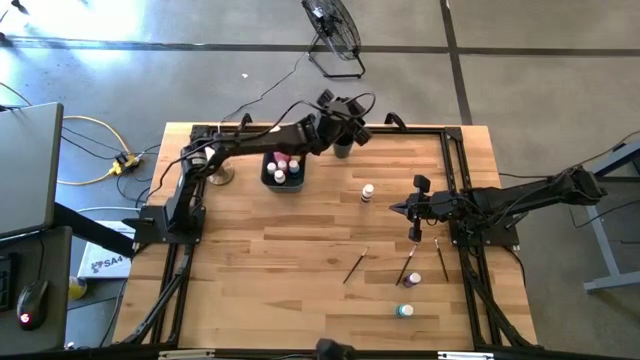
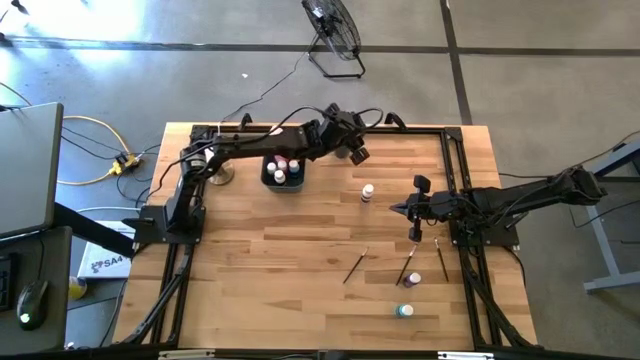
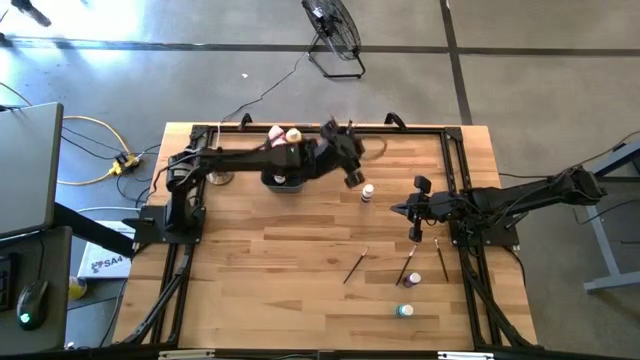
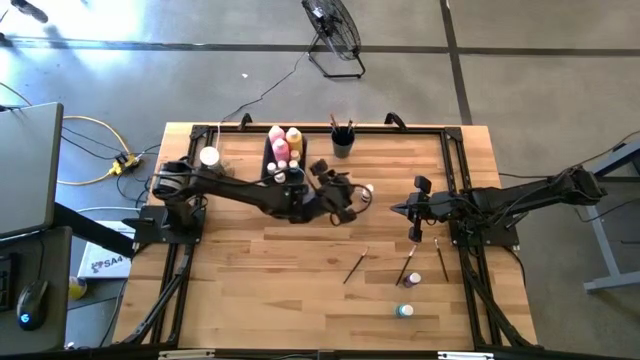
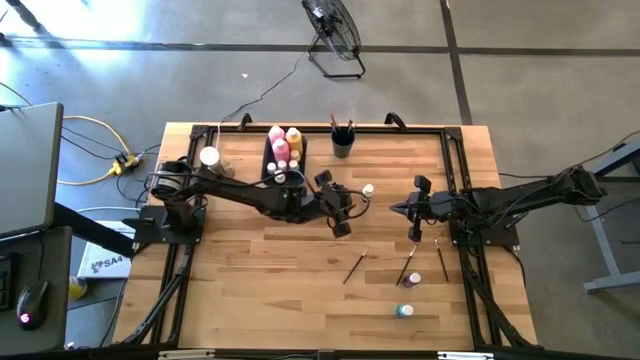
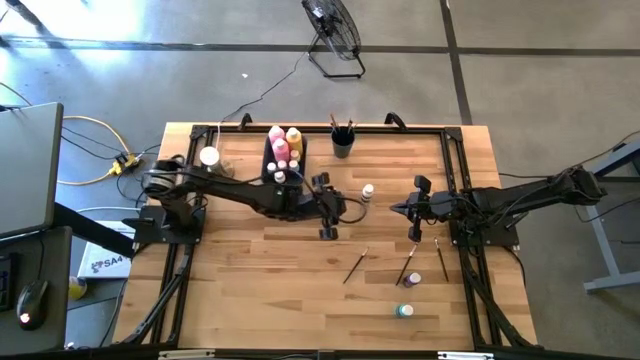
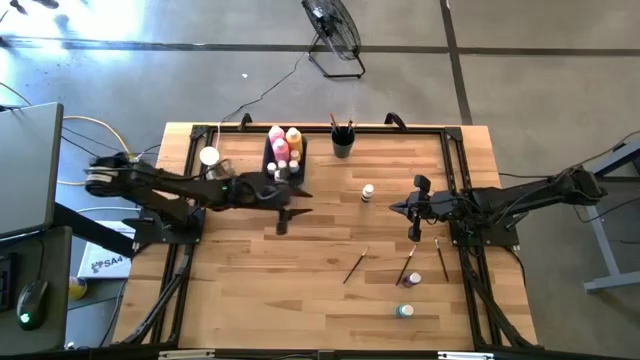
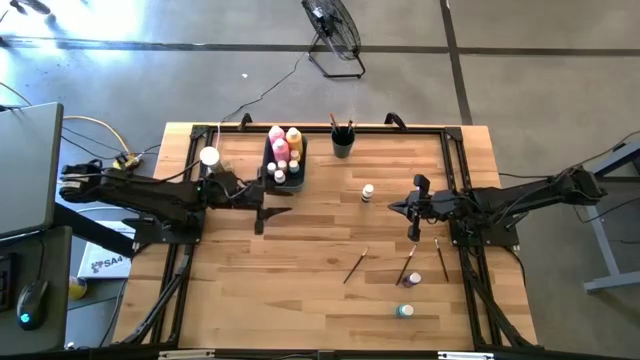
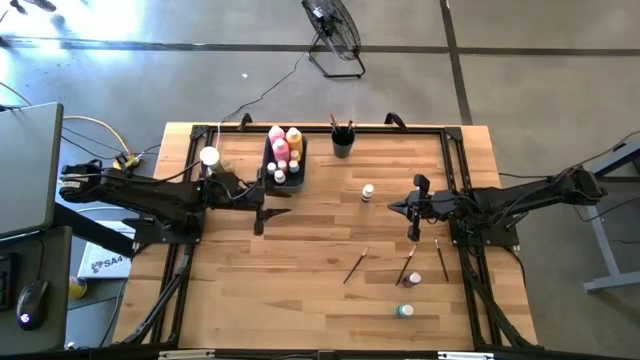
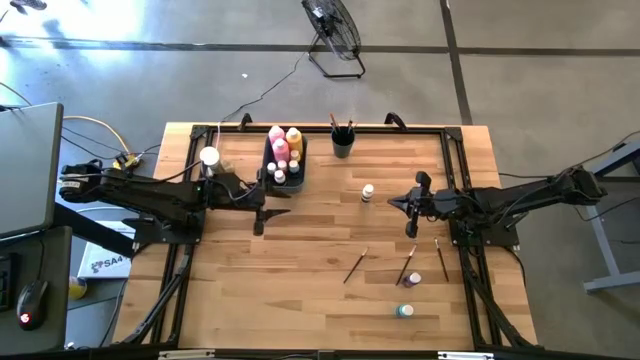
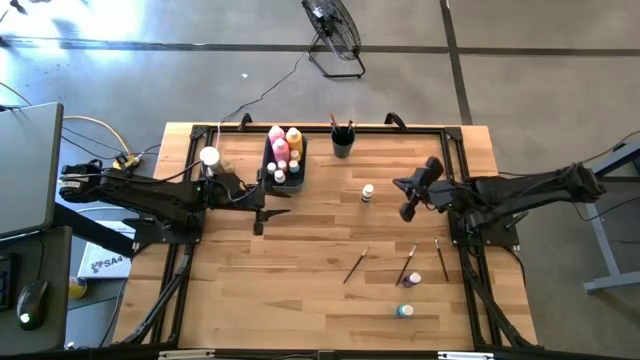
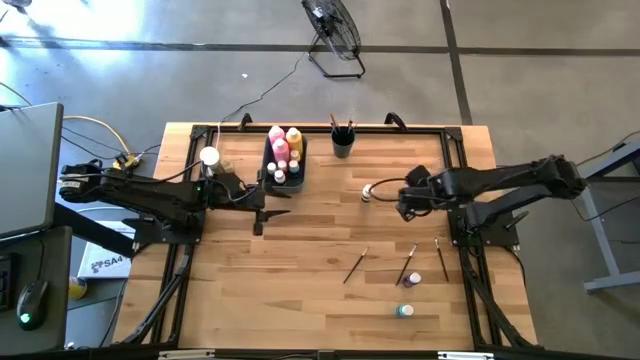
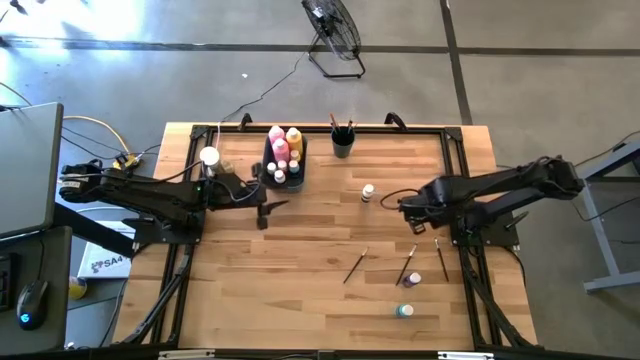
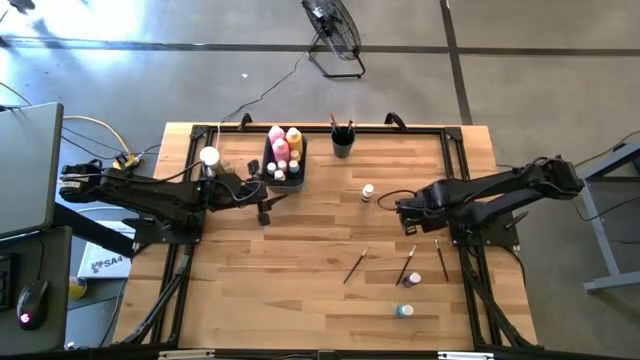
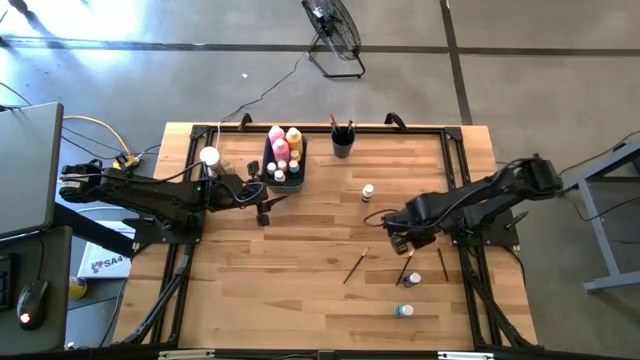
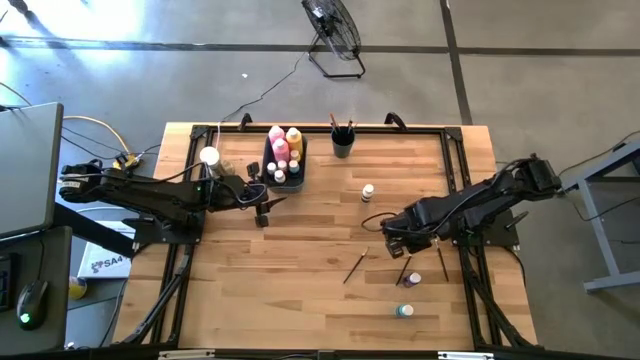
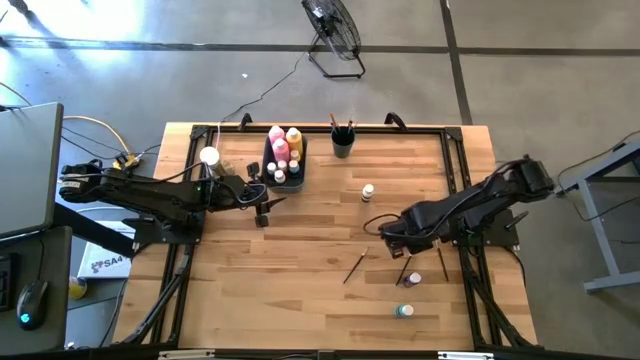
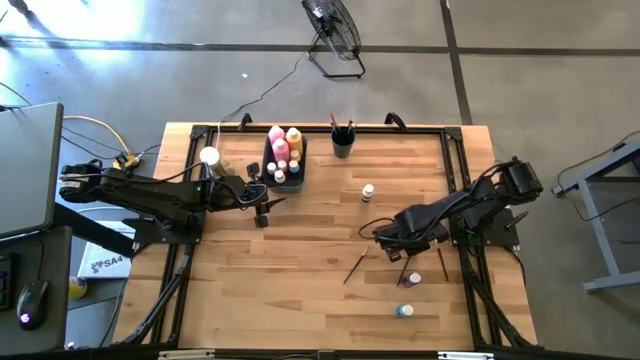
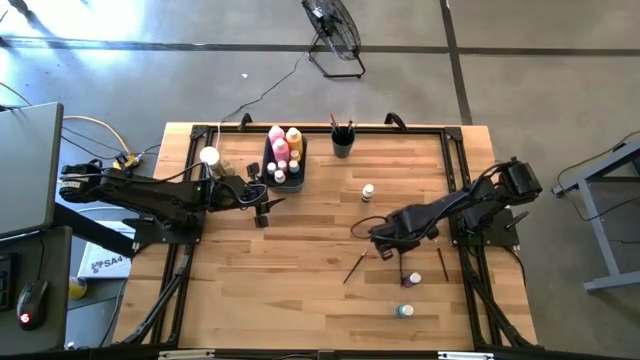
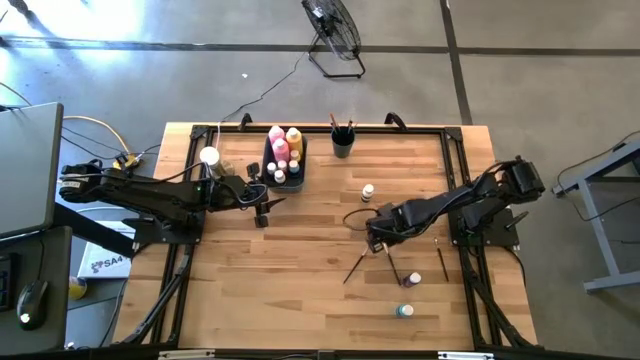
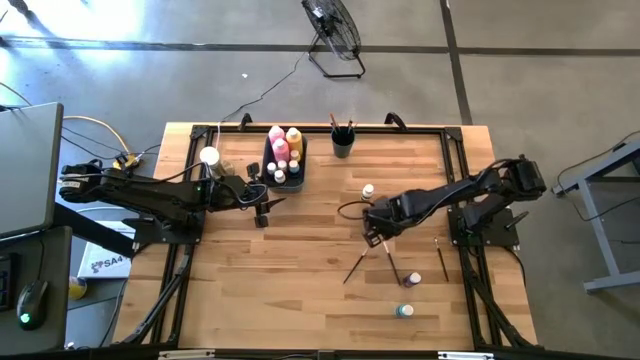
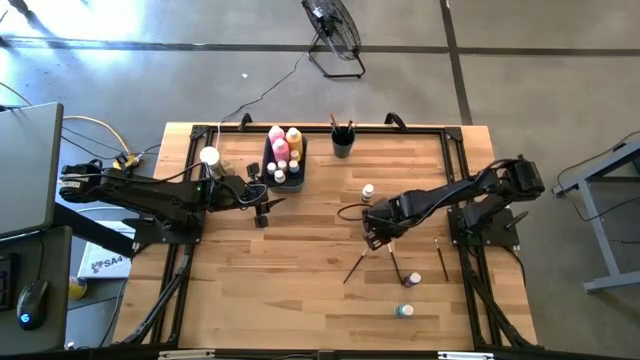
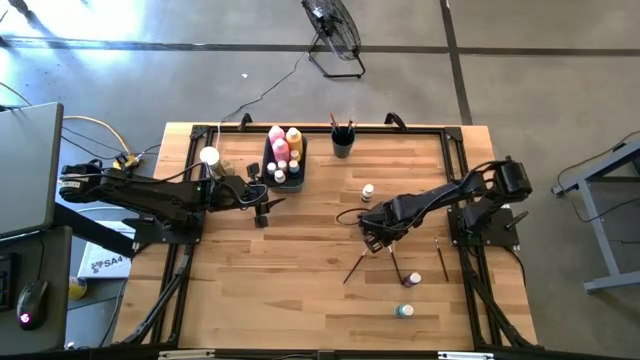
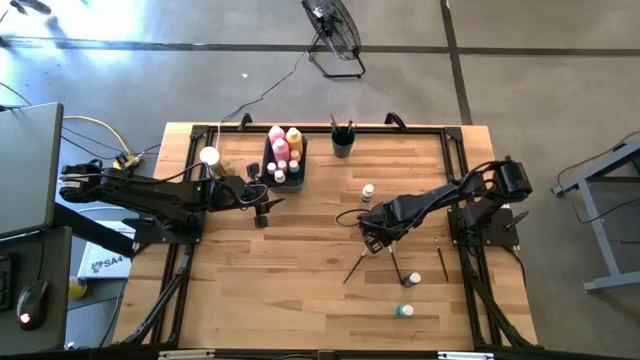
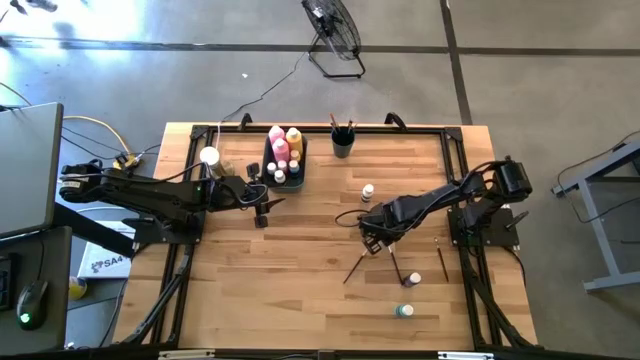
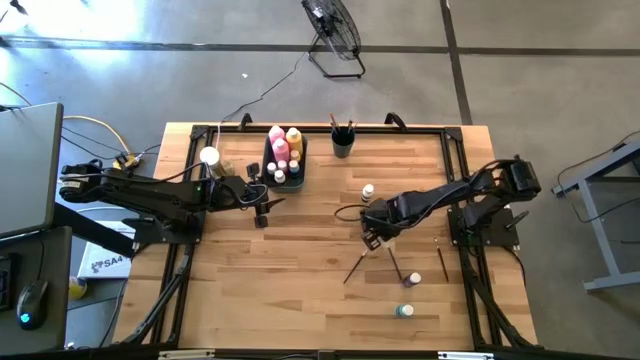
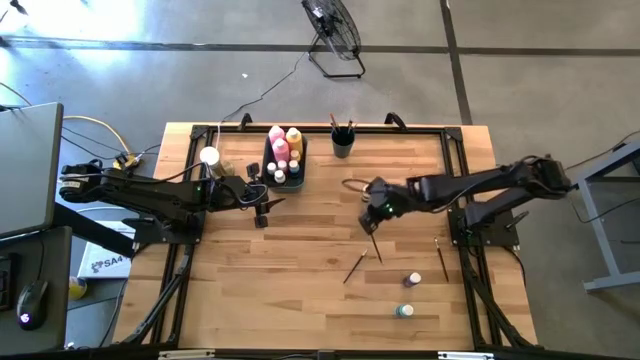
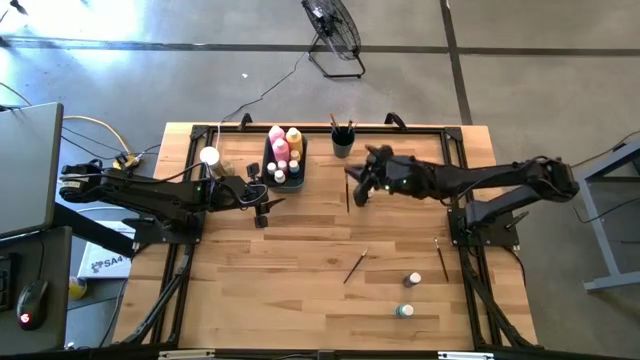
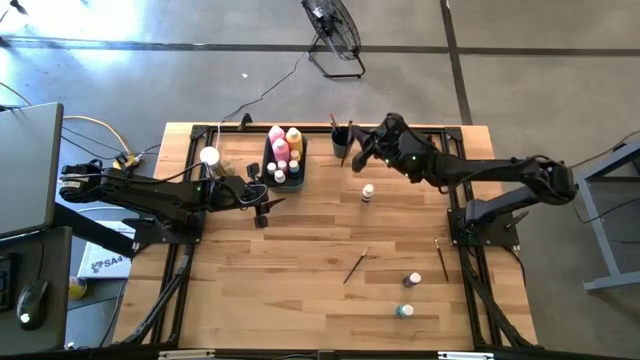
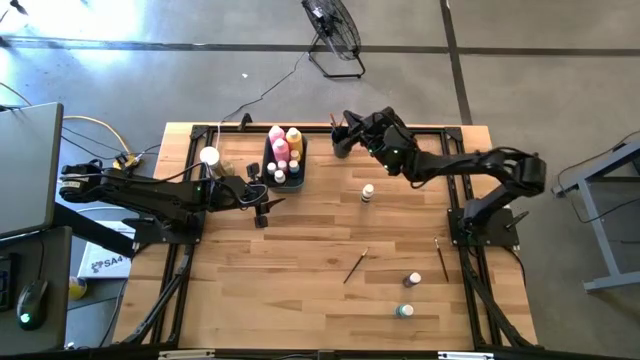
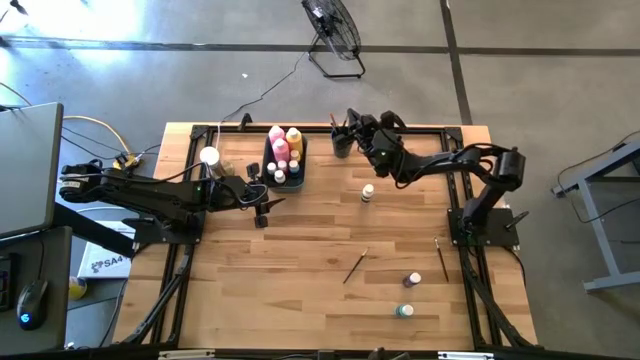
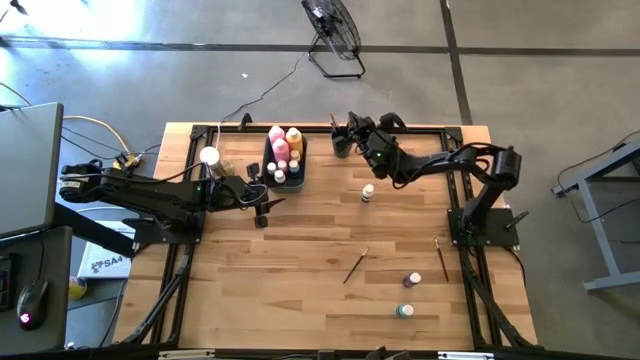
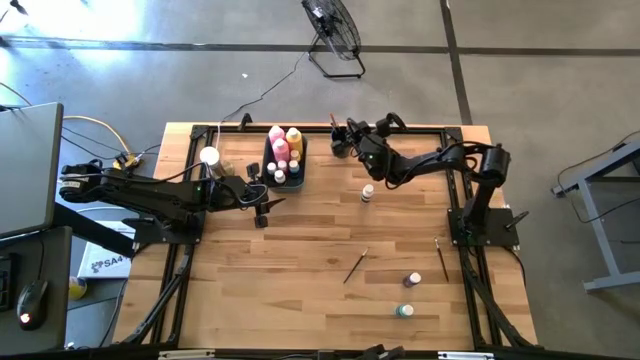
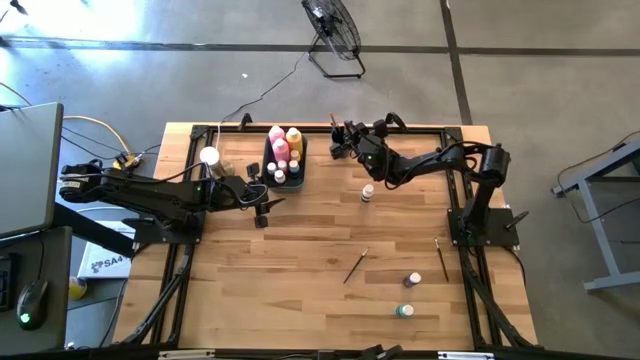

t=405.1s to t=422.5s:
Task: Pick & Place Paint Supplies
Put the silver paint brush into the green cup
